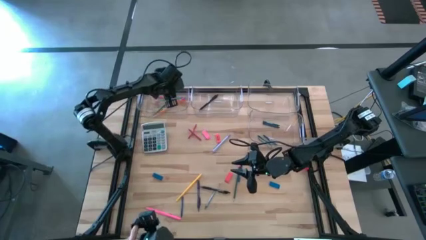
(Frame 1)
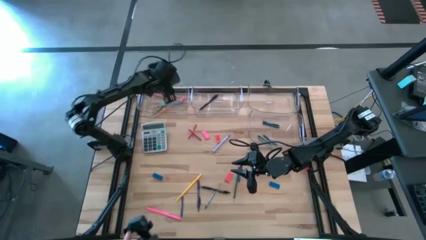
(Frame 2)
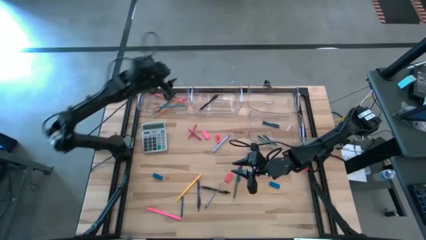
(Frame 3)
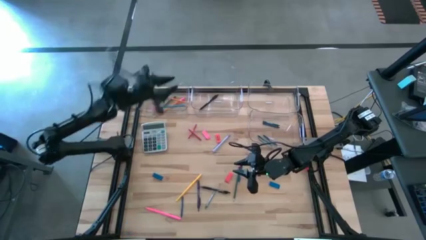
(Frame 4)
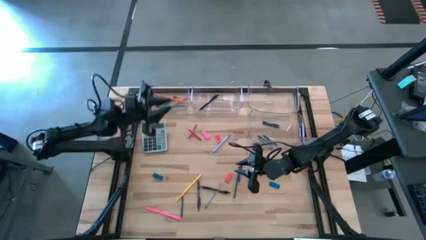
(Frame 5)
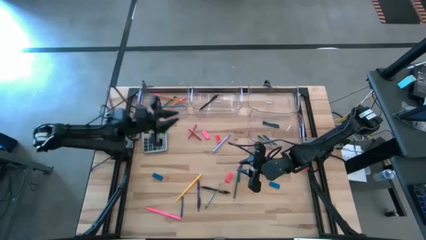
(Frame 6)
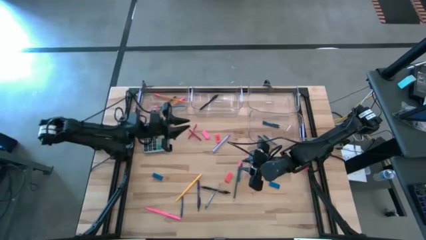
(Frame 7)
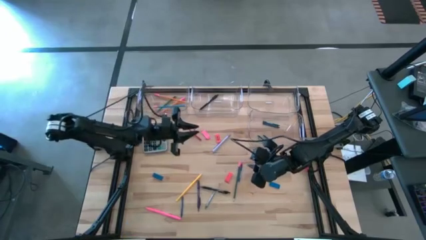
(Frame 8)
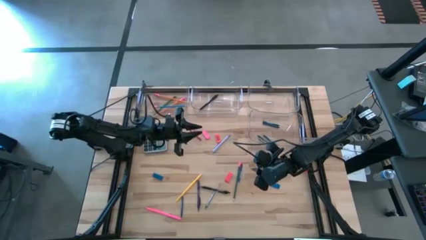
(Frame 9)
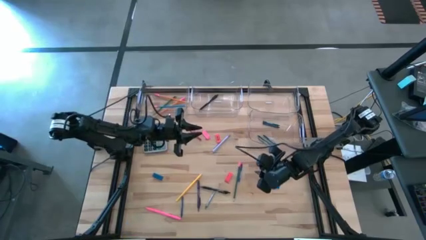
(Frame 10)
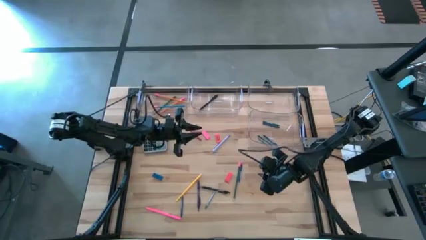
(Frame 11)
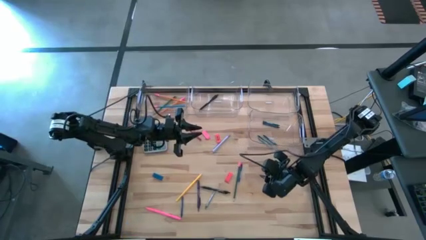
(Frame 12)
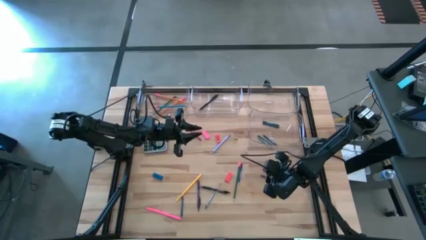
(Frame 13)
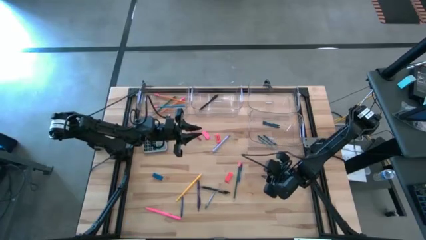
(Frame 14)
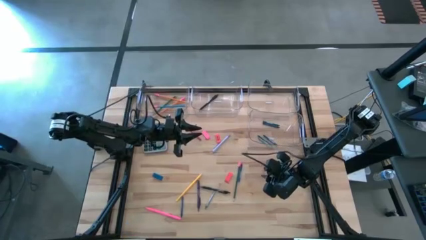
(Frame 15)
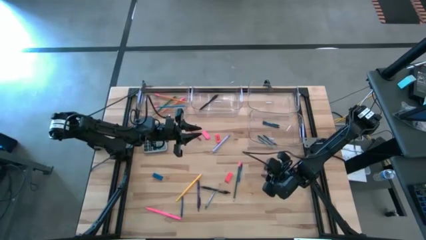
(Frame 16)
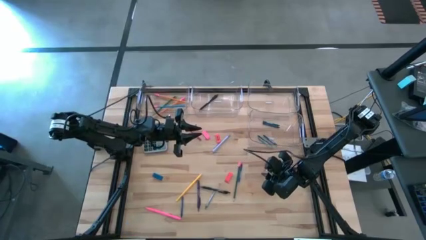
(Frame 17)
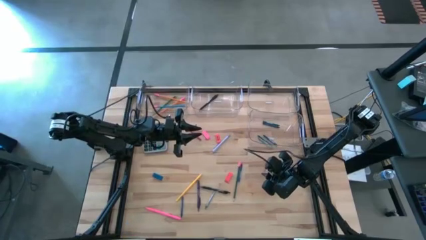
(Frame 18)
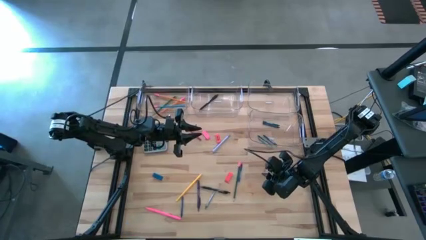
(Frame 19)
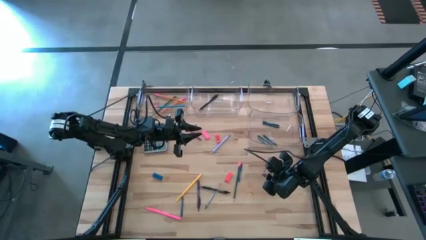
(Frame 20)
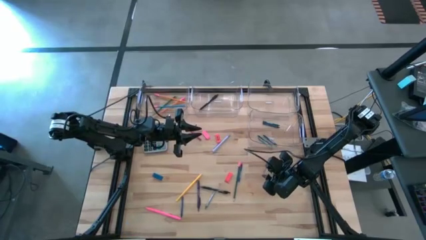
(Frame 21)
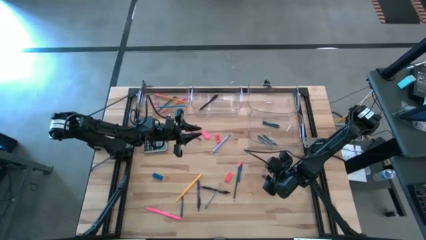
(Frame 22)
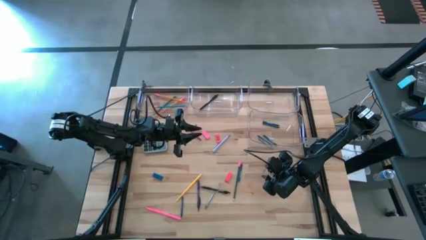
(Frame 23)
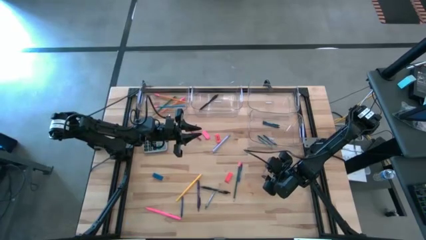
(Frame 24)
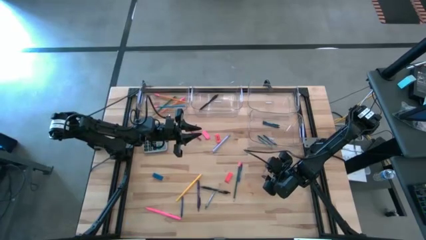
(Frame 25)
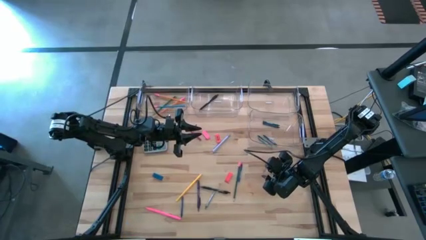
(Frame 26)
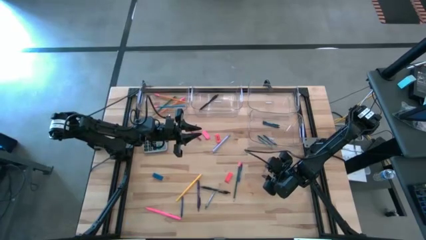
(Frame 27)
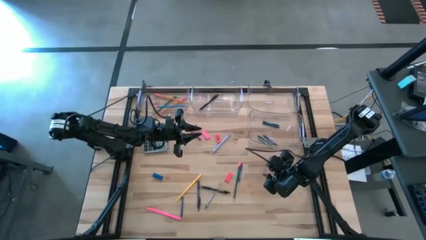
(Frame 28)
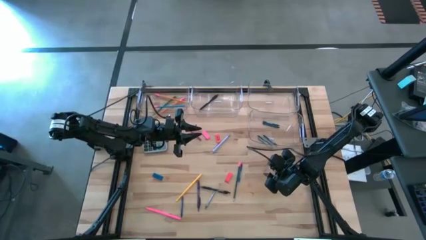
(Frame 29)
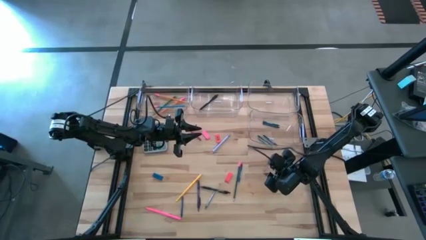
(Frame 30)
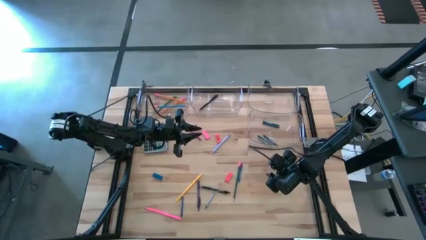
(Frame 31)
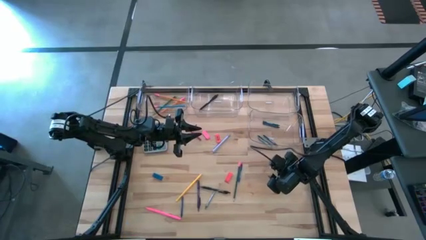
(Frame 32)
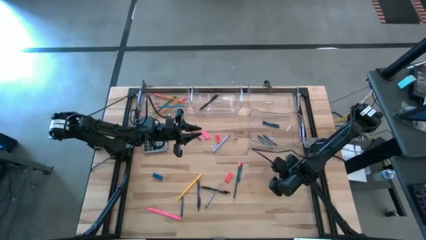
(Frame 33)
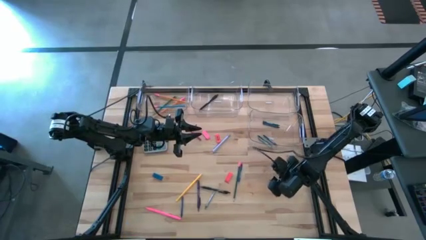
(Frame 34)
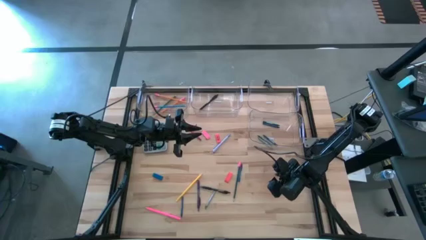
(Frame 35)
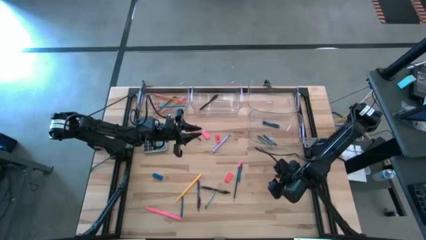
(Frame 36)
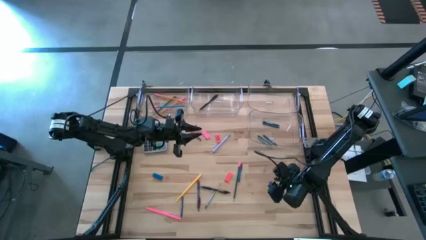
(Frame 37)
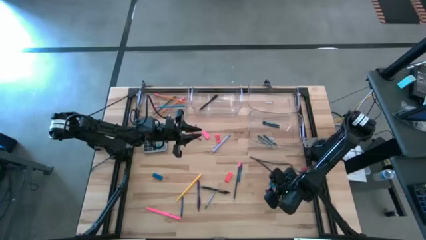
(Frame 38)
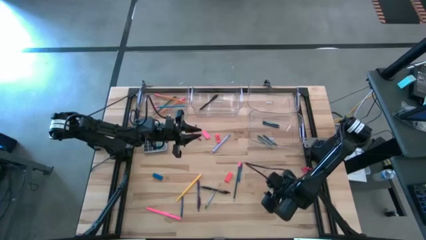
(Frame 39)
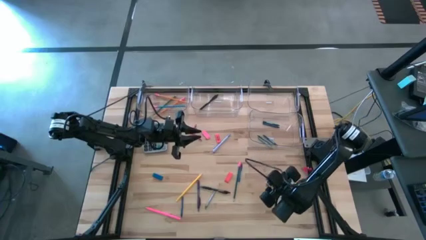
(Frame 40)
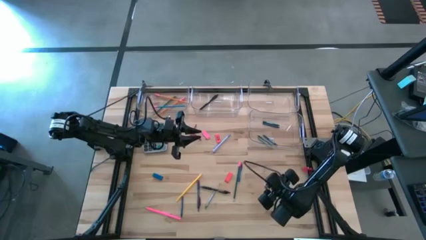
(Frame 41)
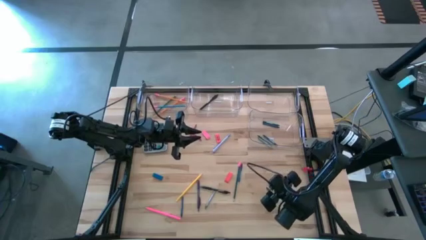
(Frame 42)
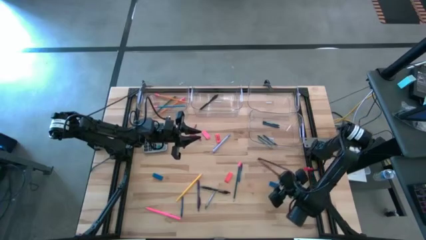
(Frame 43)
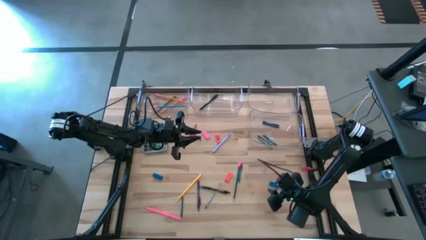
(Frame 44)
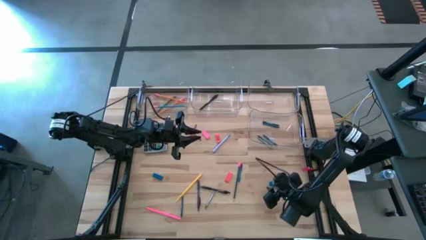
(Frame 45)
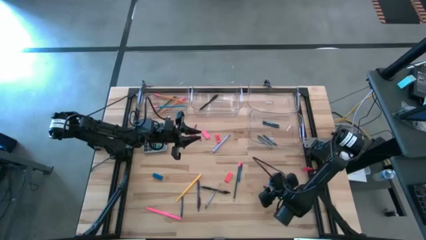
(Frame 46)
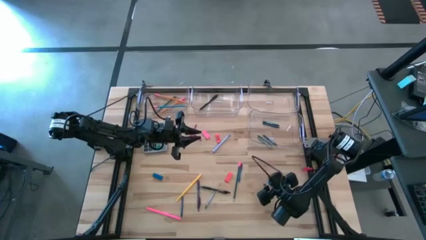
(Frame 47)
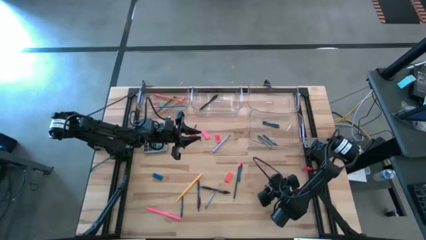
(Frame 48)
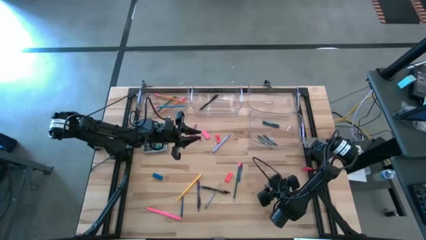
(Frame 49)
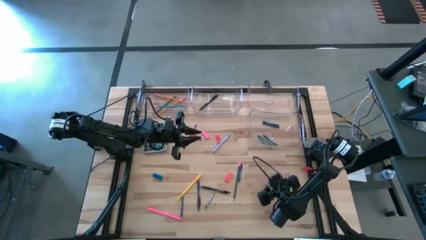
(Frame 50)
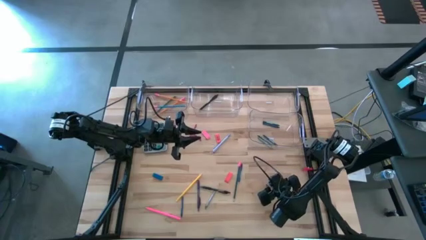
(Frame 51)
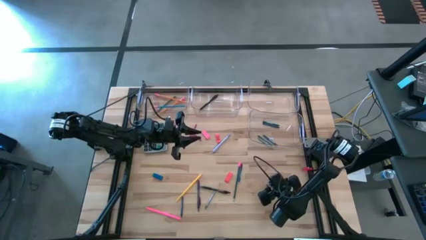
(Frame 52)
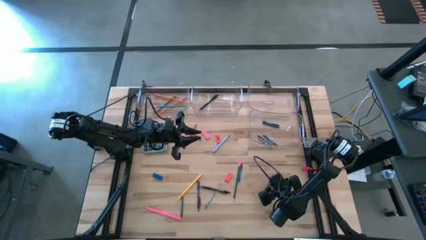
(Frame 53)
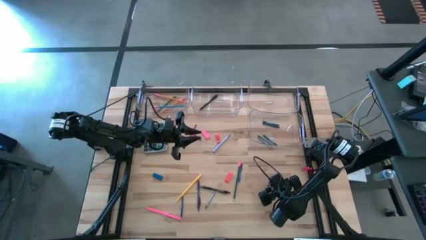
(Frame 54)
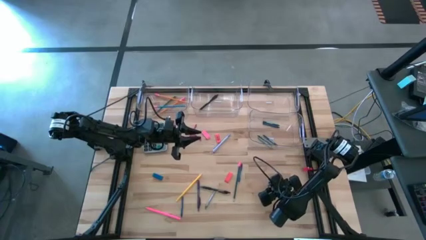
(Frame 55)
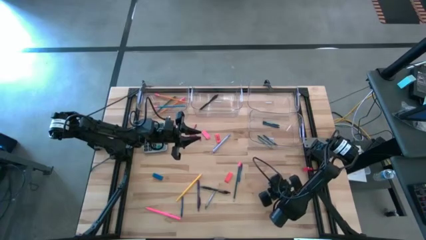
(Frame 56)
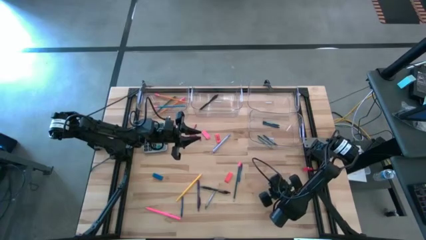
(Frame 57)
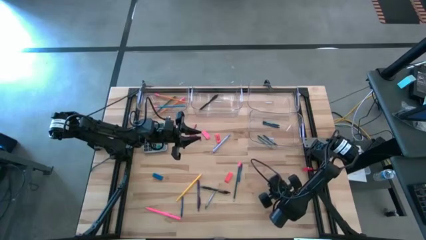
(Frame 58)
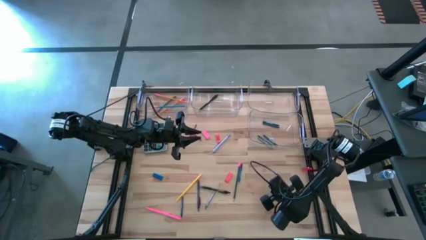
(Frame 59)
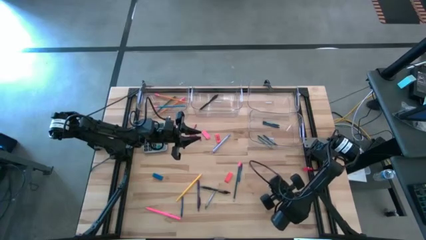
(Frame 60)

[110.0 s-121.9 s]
Task: Sort crayons/erasers/pens/pencils in bins
Put the blue eraser into the top right transparent bin

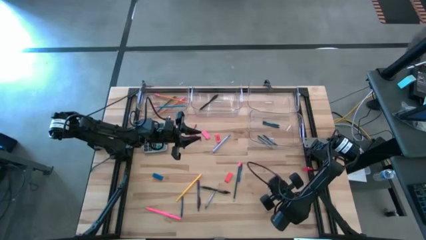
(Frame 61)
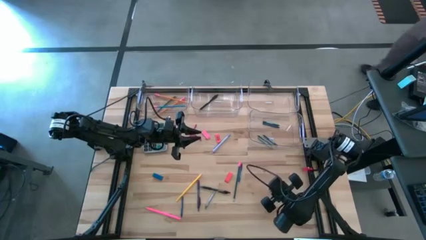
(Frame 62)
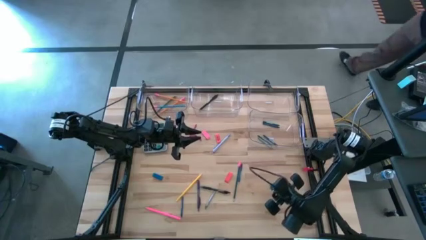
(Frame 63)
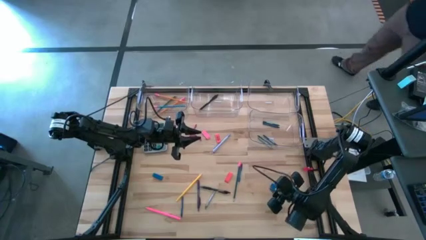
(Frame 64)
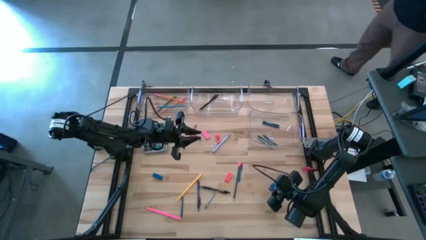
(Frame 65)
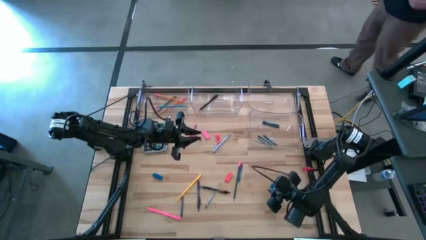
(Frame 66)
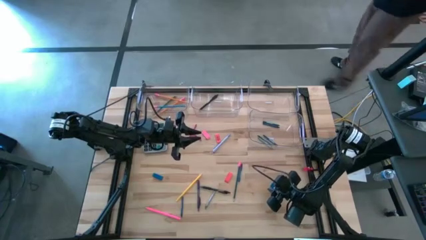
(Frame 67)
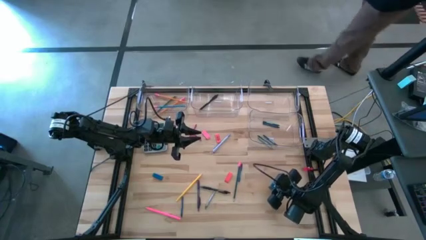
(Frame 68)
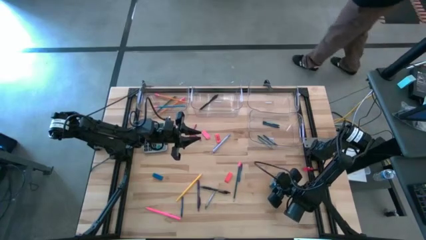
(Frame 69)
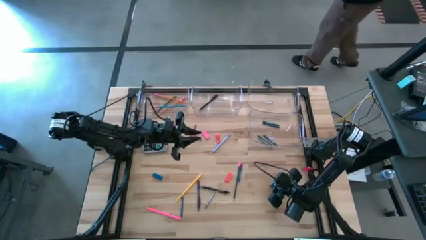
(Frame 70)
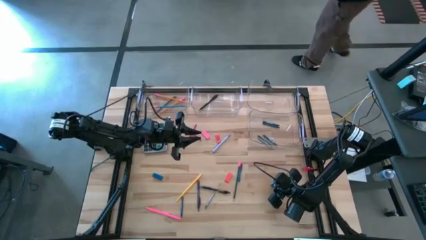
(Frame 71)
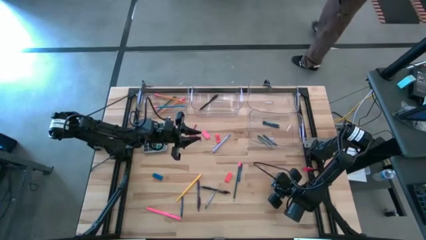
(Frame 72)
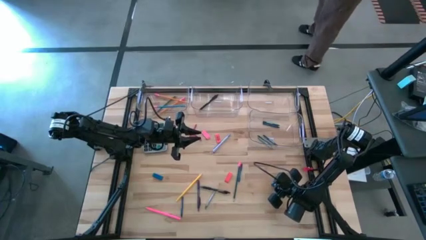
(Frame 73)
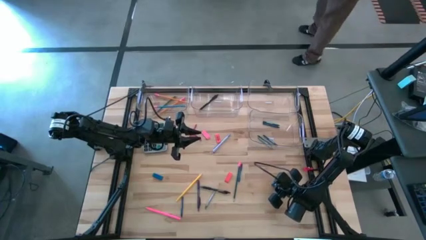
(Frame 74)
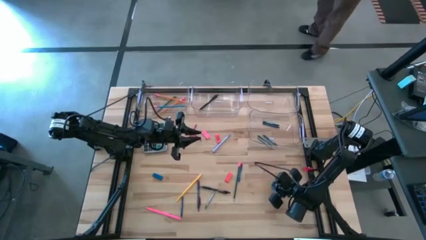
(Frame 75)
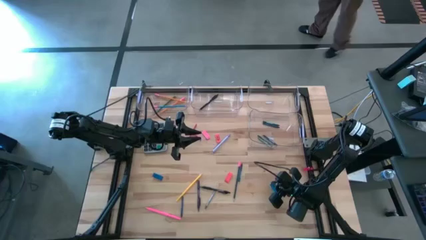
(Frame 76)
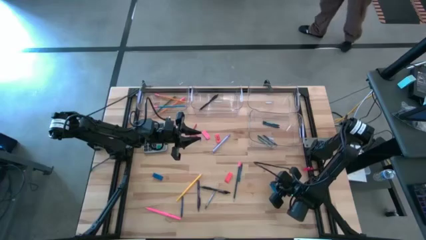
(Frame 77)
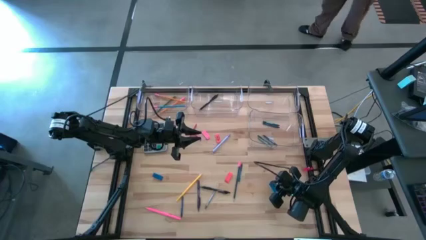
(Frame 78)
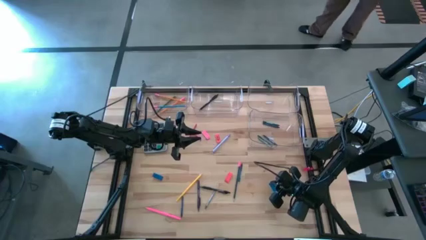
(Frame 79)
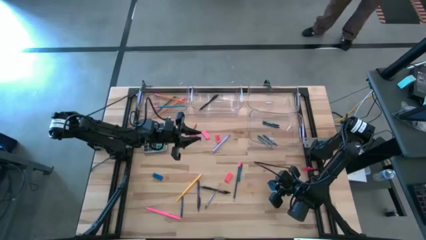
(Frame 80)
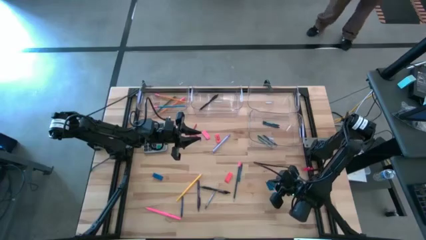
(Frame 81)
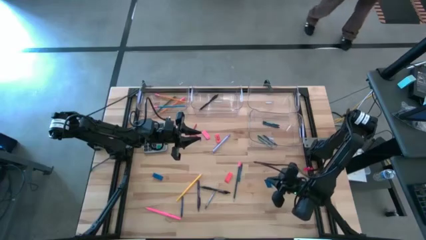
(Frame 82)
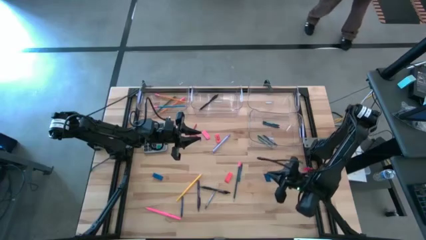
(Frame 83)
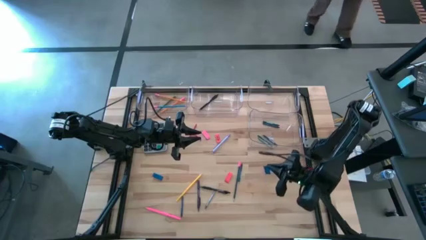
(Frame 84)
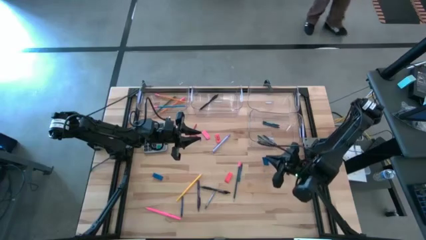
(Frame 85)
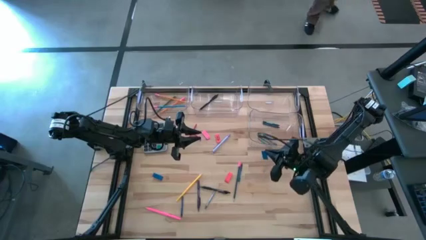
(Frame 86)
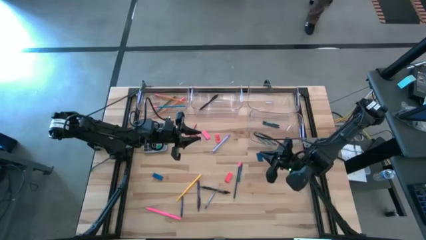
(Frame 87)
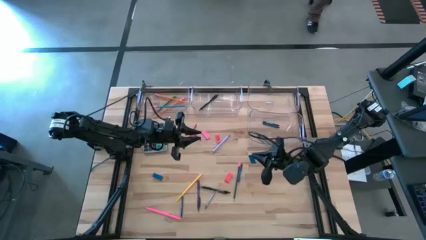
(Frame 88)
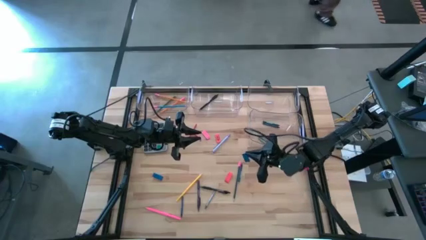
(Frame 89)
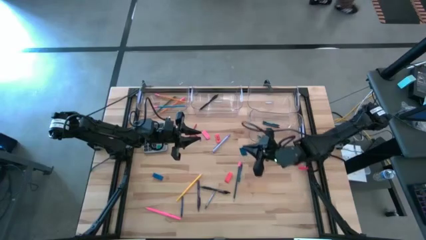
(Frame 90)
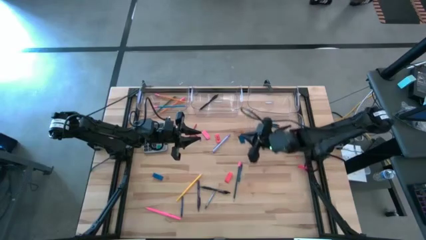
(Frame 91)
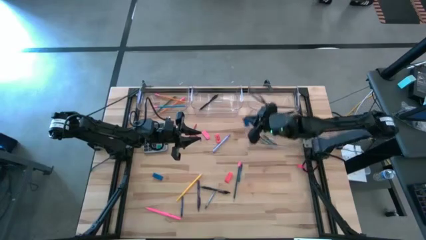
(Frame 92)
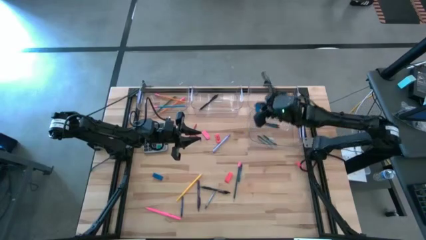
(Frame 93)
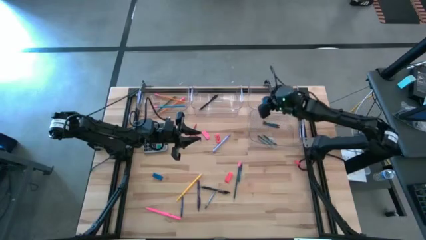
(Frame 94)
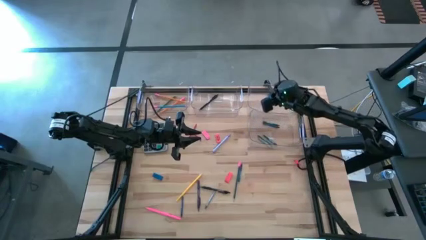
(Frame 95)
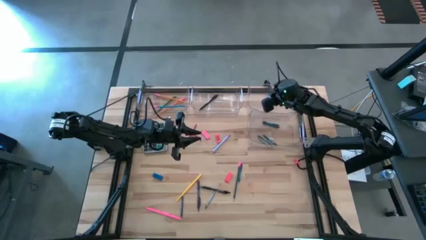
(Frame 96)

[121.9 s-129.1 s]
Put the blue eraser into the top right transparent bin
